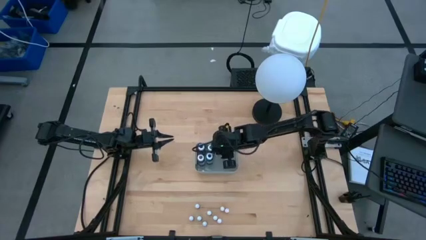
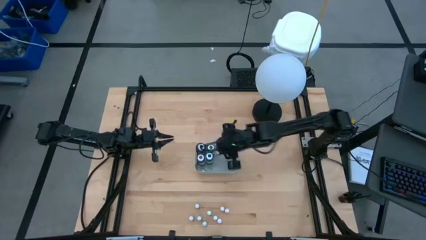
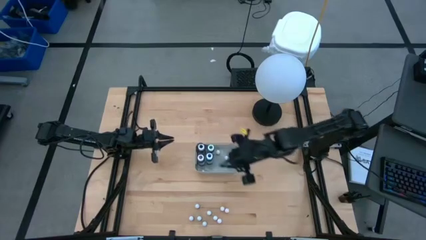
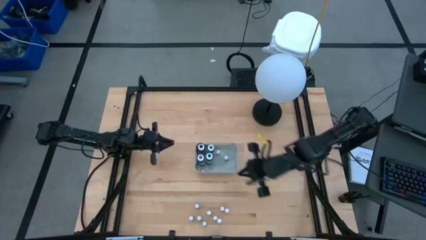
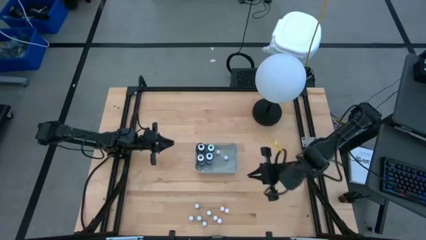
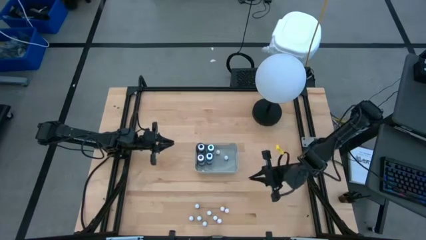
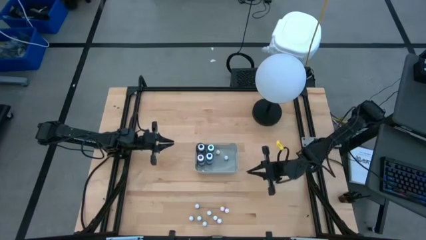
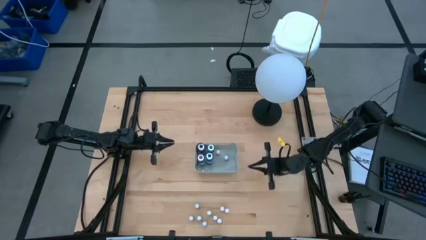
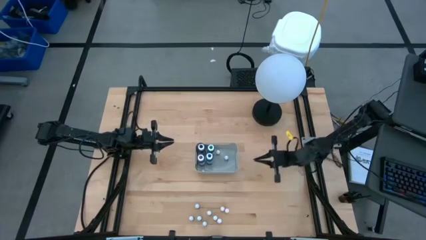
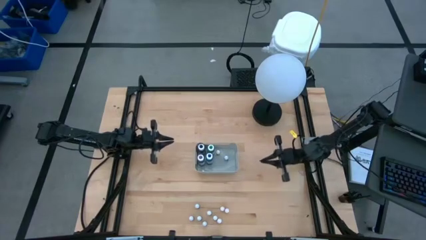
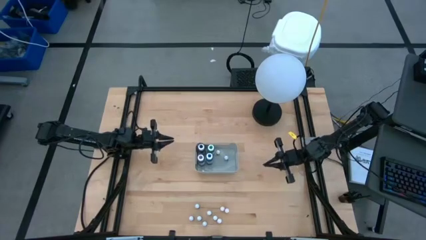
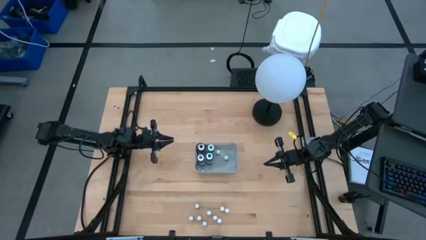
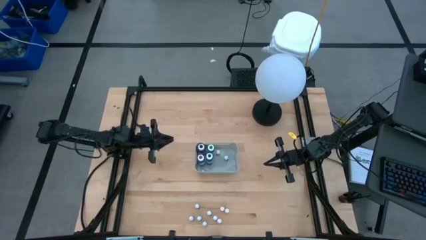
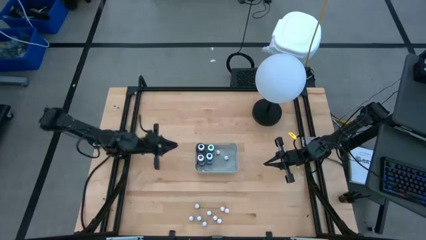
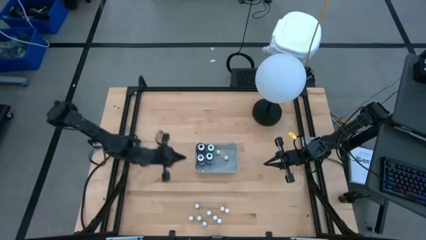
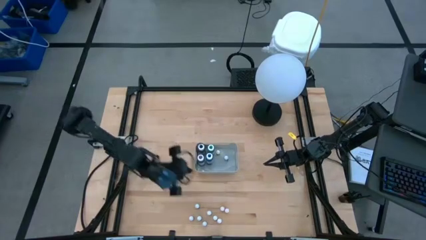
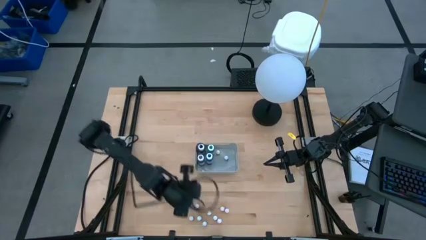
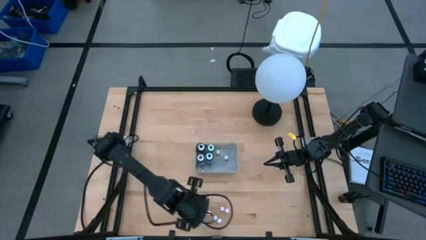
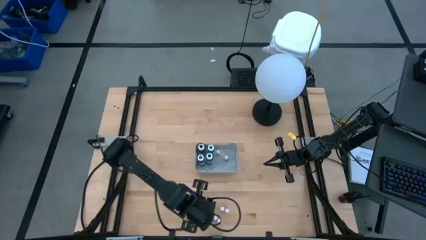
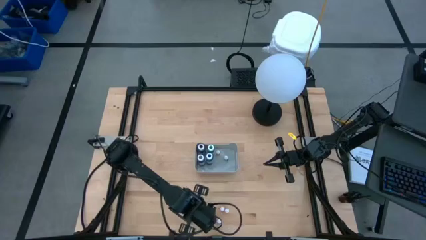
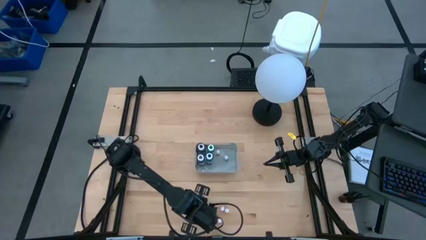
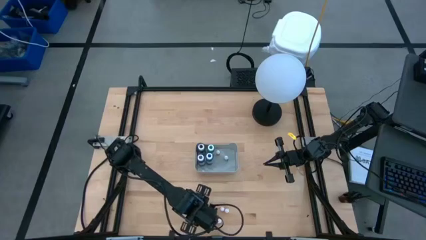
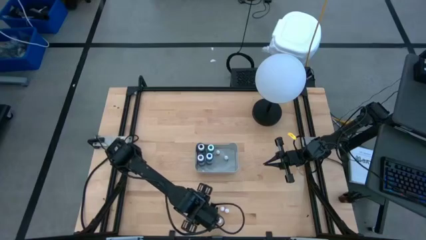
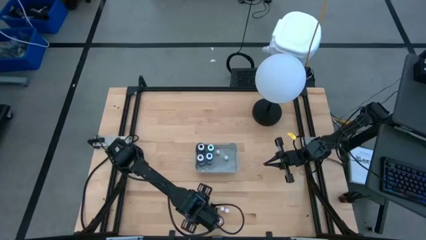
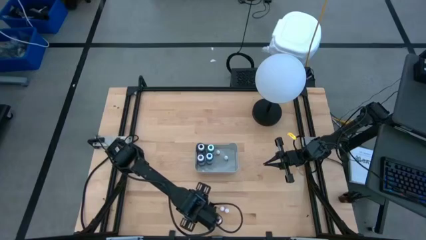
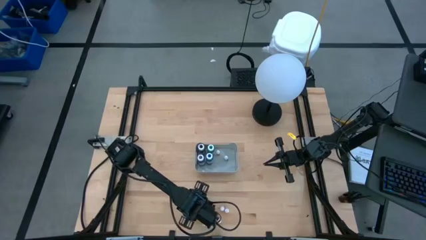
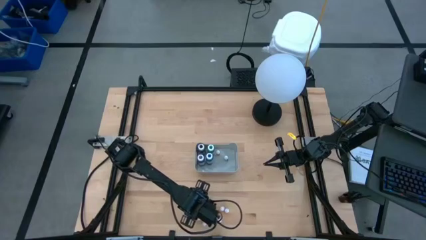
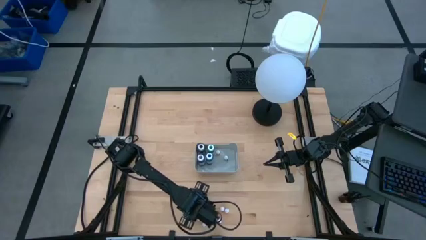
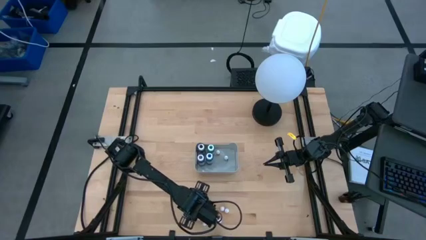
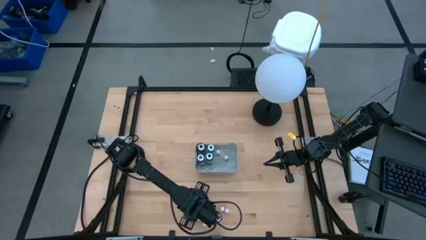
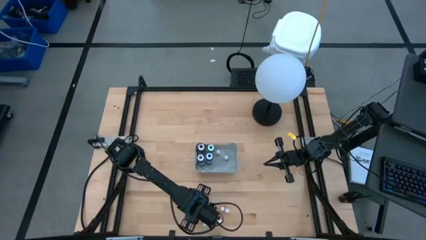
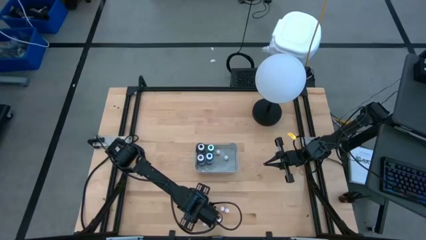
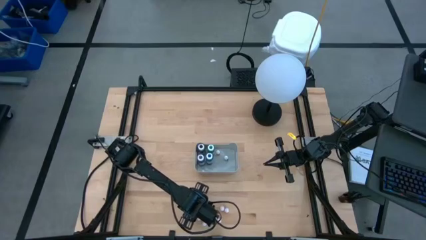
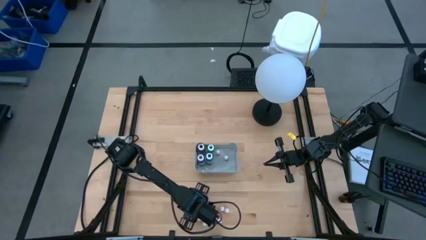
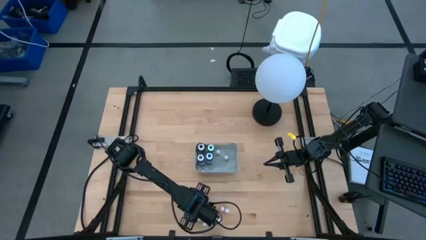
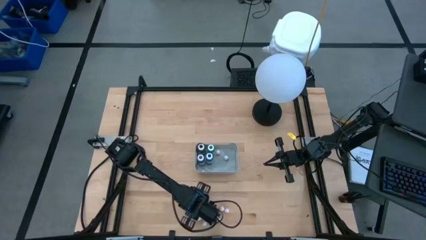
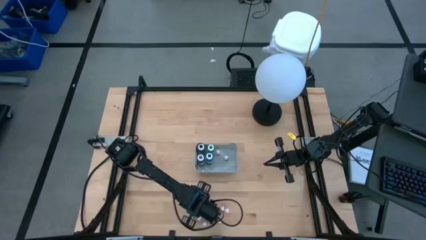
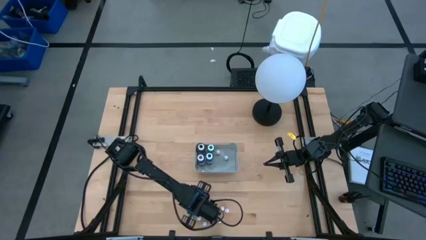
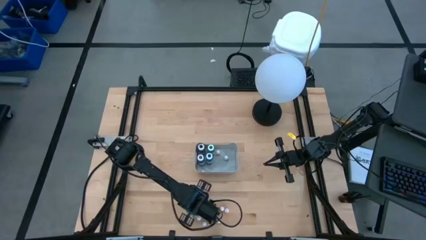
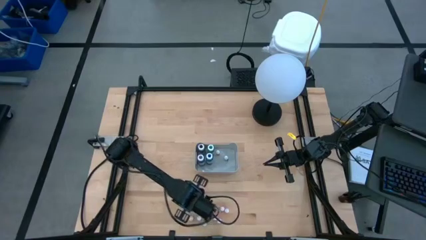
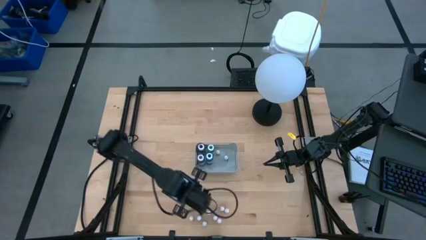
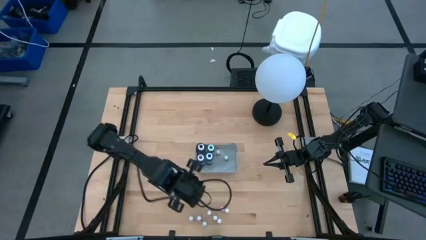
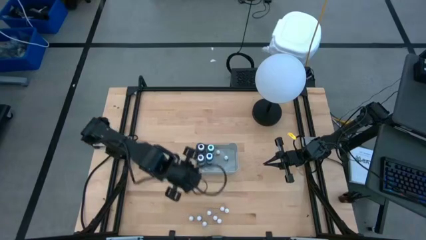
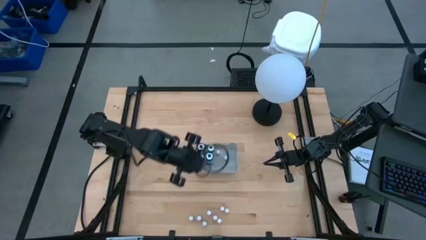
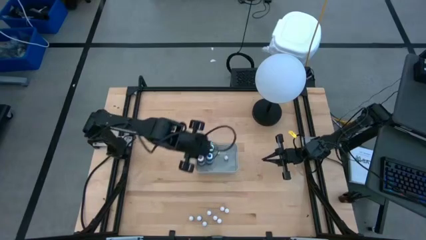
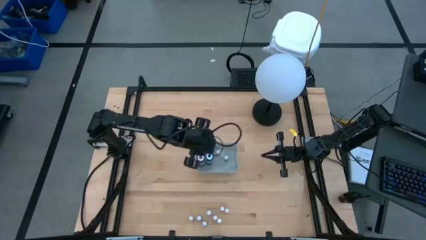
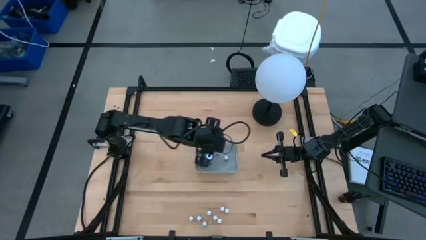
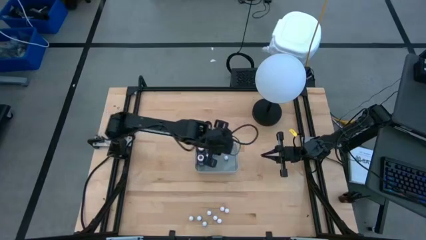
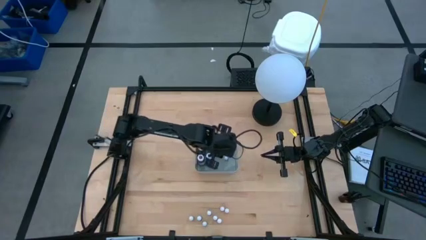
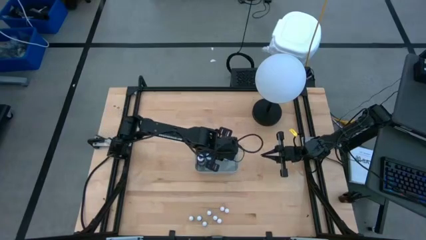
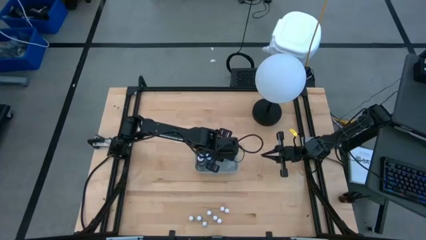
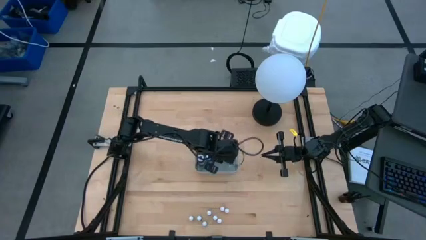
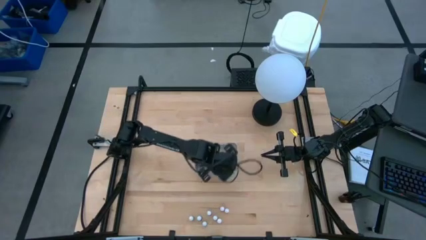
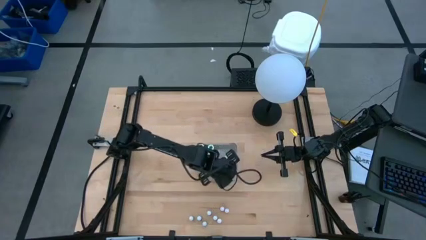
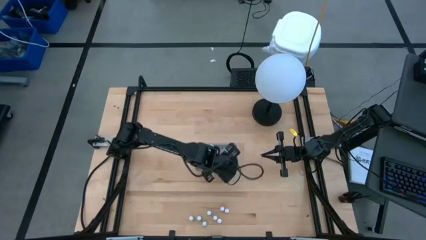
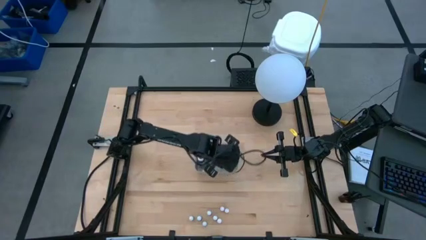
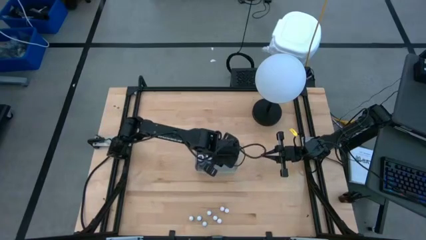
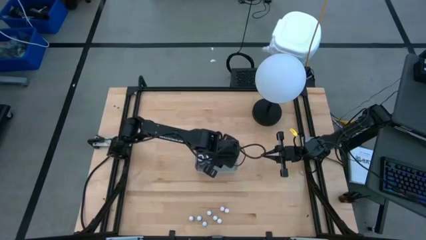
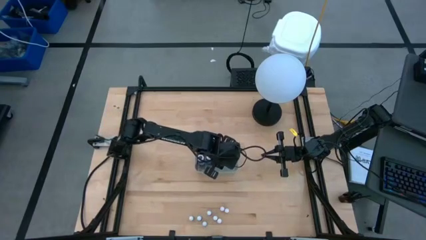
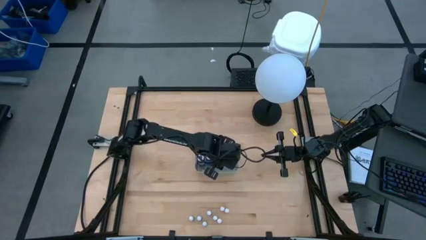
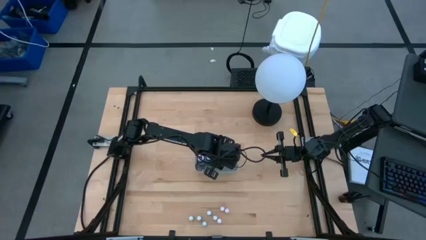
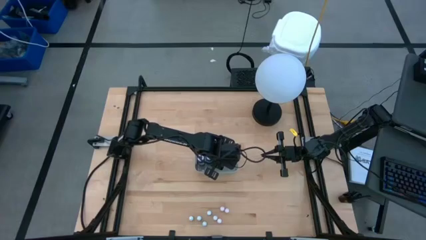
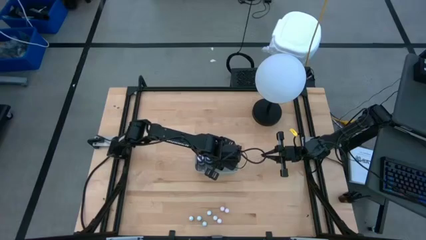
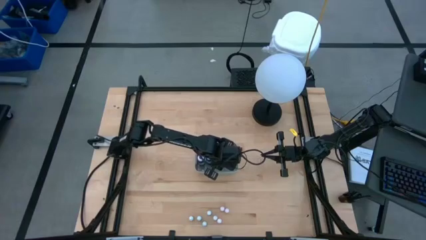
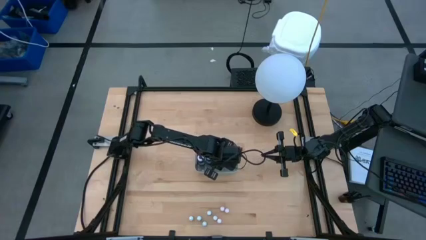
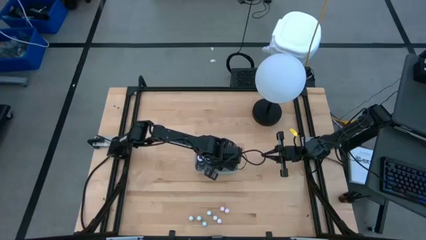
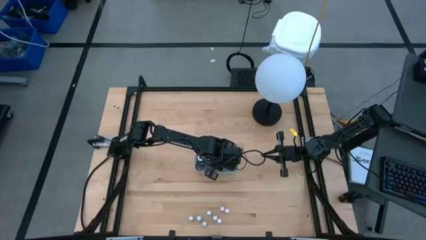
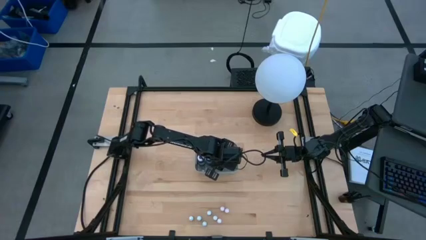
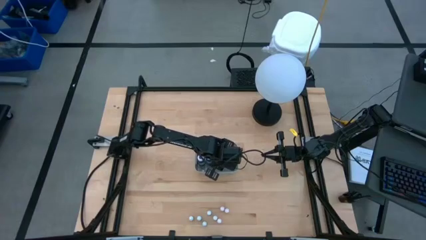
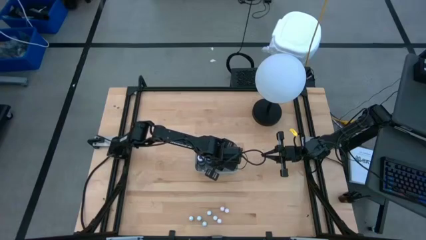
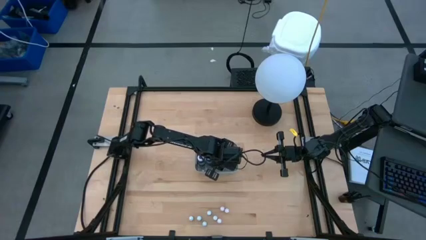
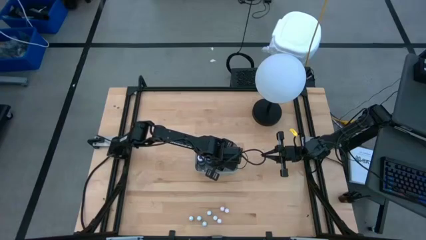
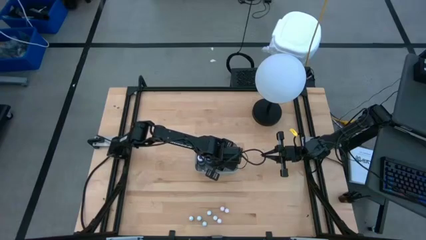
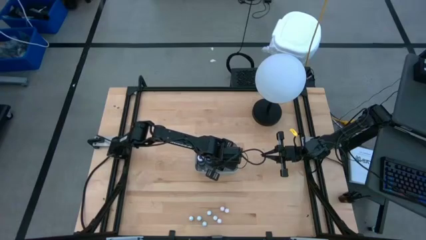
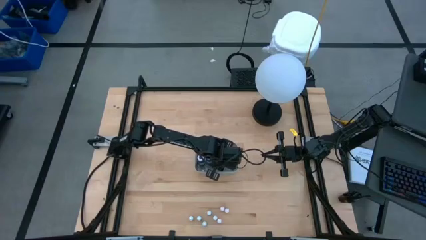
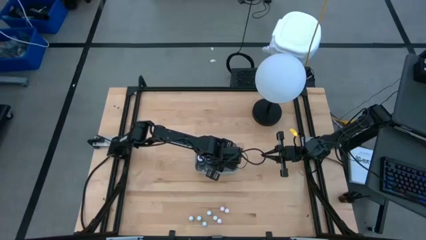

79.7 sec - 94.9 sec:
Task: Pick & Place food coloring
Put the small blue food coloring bottle into the gray bin
